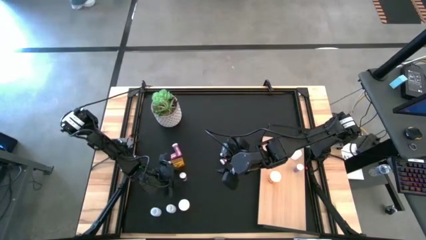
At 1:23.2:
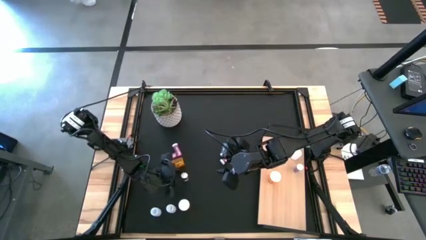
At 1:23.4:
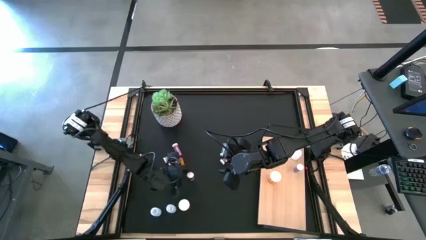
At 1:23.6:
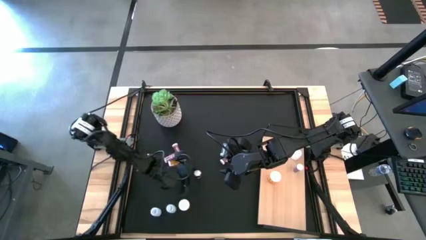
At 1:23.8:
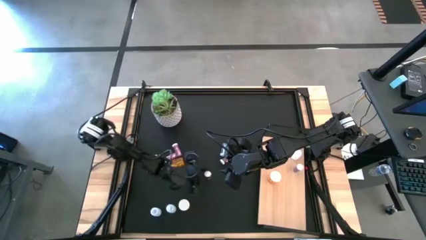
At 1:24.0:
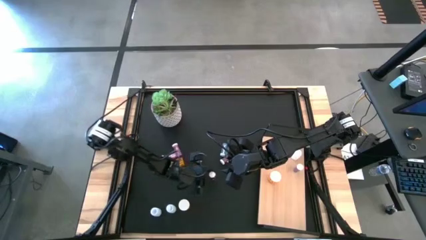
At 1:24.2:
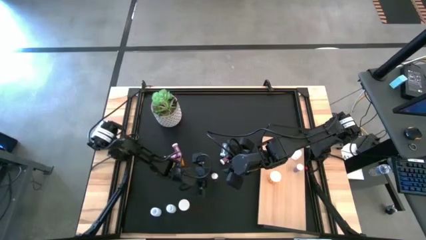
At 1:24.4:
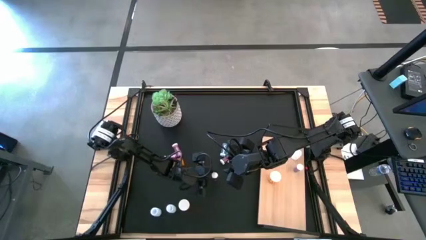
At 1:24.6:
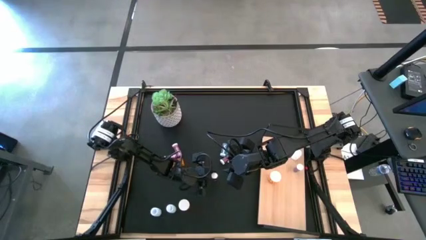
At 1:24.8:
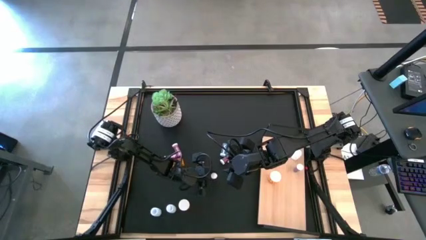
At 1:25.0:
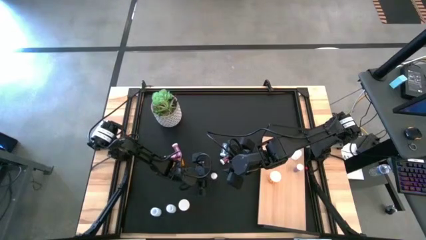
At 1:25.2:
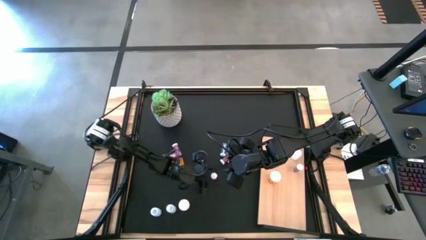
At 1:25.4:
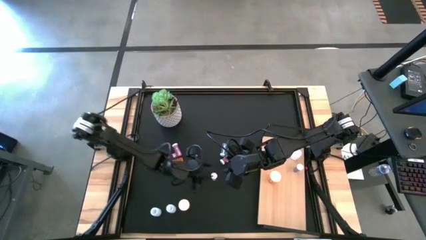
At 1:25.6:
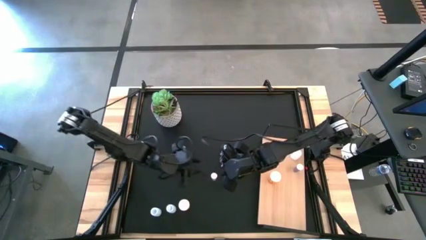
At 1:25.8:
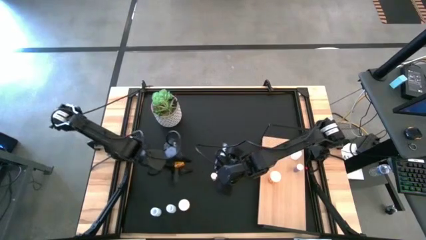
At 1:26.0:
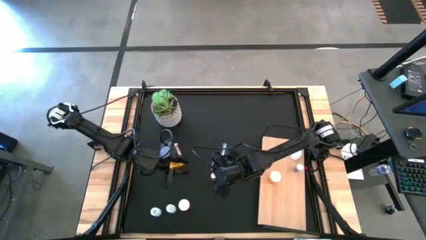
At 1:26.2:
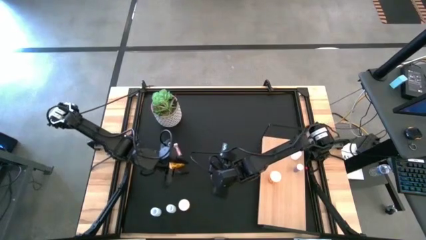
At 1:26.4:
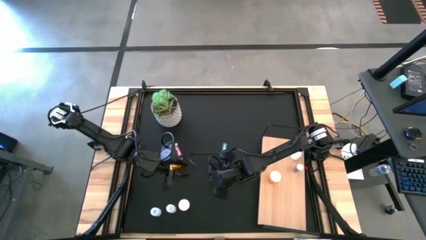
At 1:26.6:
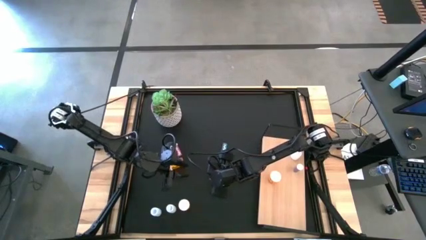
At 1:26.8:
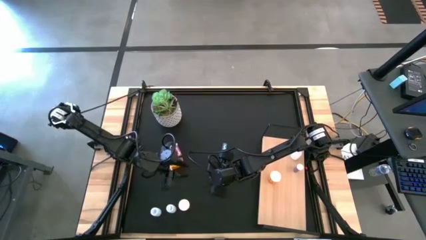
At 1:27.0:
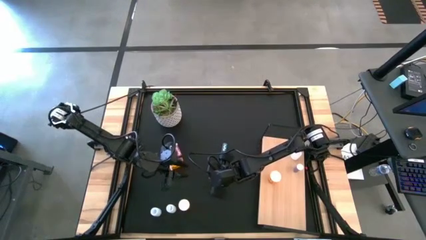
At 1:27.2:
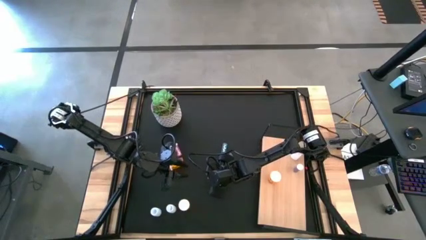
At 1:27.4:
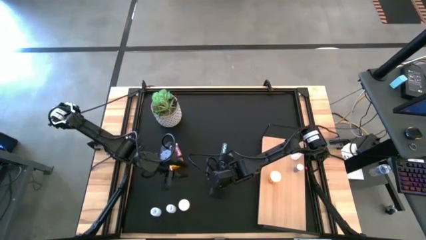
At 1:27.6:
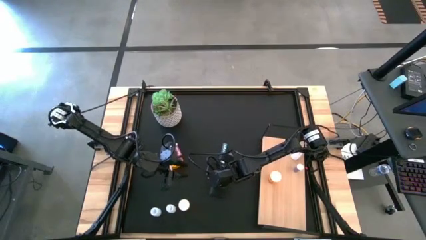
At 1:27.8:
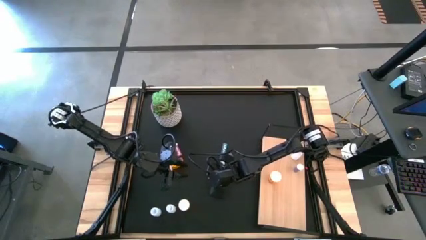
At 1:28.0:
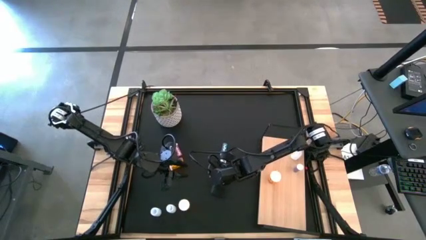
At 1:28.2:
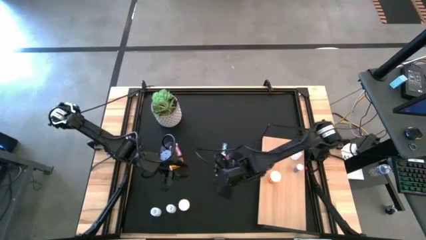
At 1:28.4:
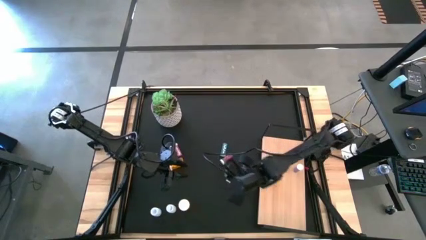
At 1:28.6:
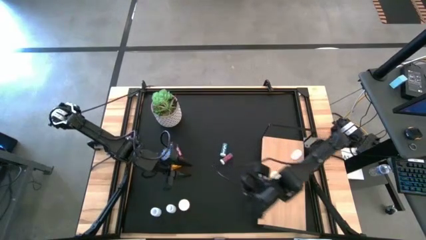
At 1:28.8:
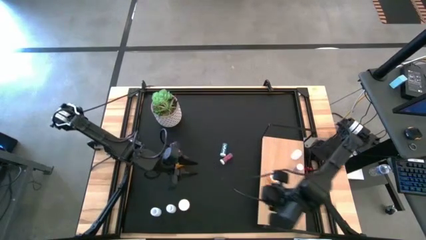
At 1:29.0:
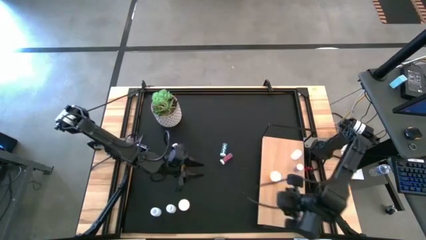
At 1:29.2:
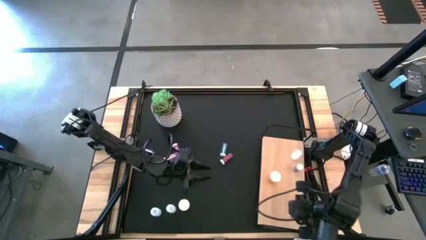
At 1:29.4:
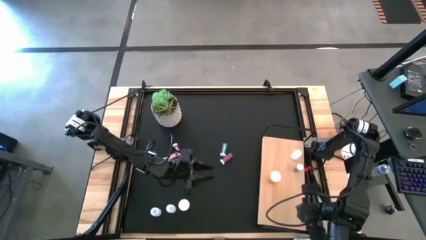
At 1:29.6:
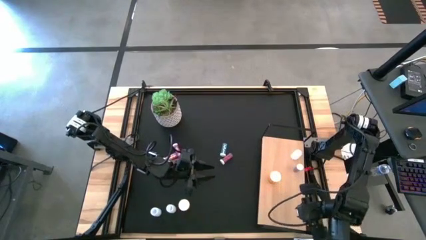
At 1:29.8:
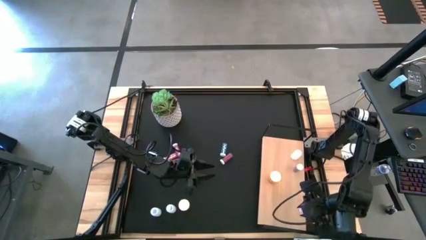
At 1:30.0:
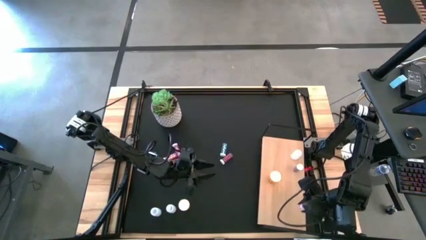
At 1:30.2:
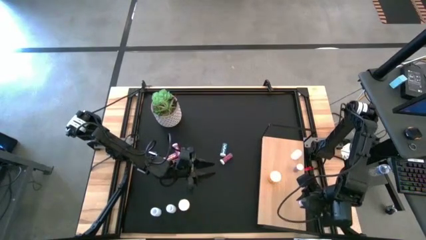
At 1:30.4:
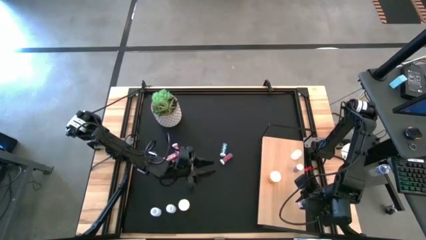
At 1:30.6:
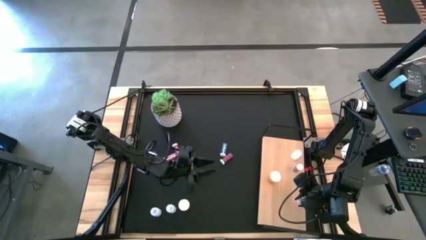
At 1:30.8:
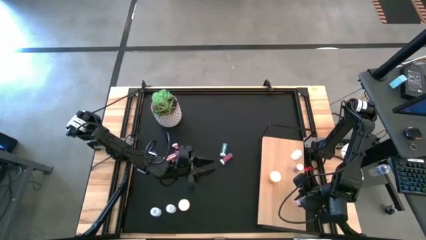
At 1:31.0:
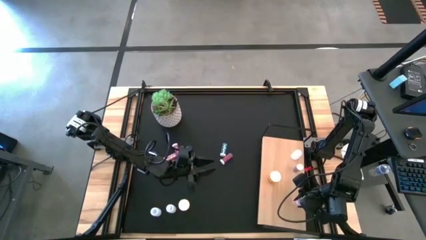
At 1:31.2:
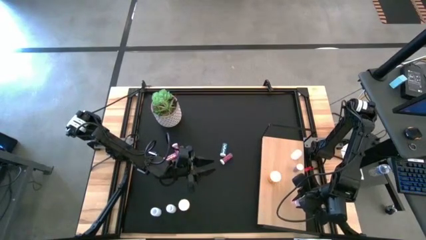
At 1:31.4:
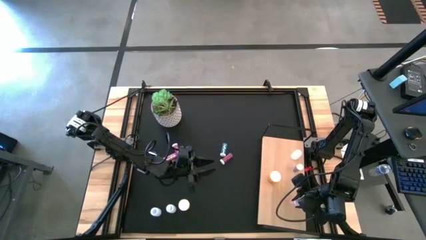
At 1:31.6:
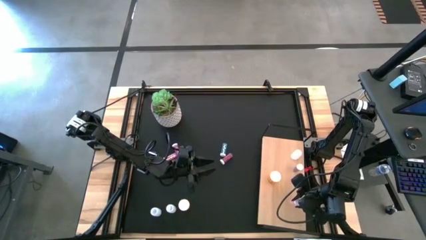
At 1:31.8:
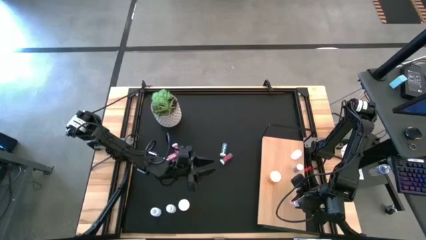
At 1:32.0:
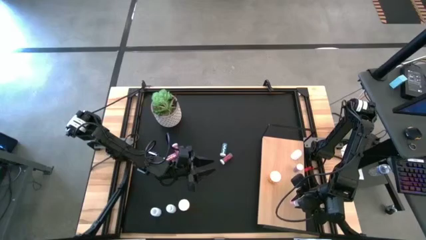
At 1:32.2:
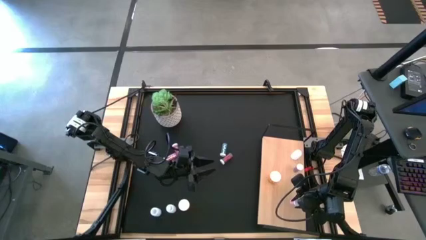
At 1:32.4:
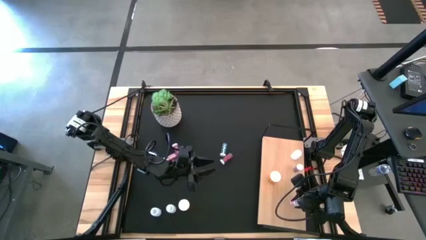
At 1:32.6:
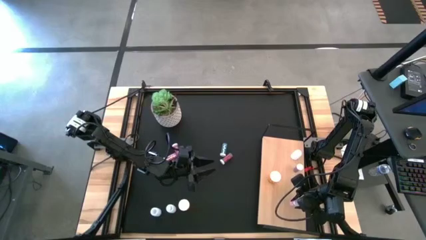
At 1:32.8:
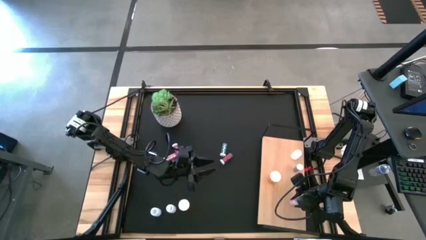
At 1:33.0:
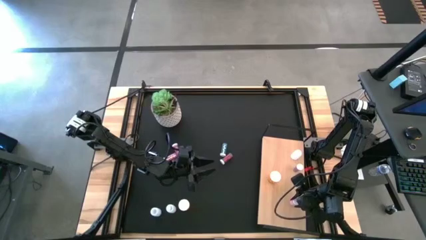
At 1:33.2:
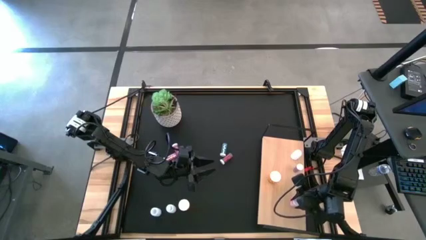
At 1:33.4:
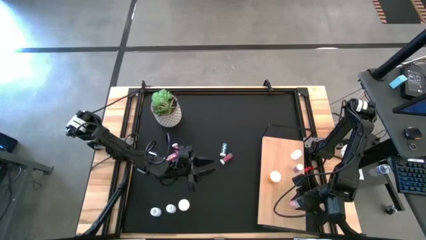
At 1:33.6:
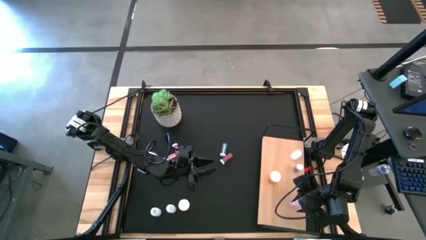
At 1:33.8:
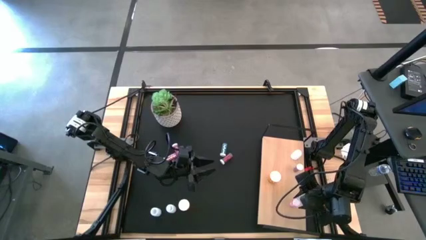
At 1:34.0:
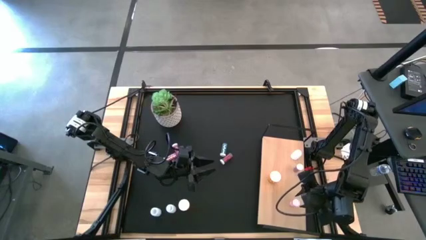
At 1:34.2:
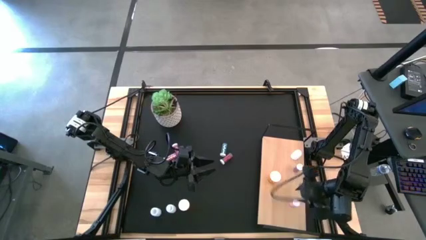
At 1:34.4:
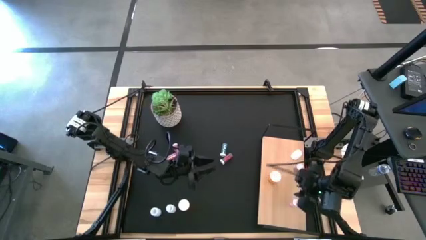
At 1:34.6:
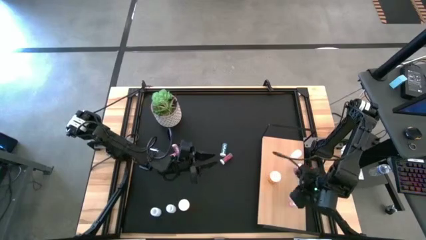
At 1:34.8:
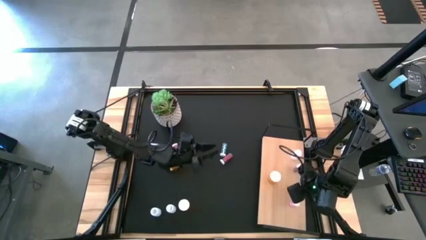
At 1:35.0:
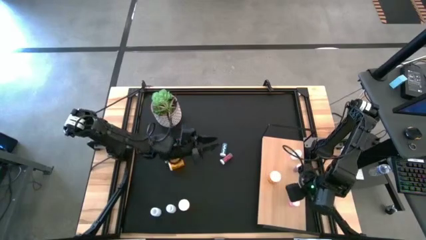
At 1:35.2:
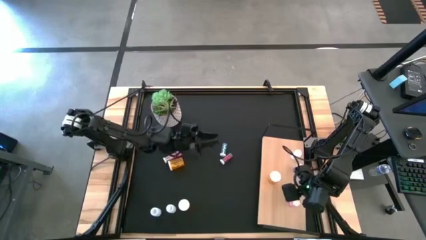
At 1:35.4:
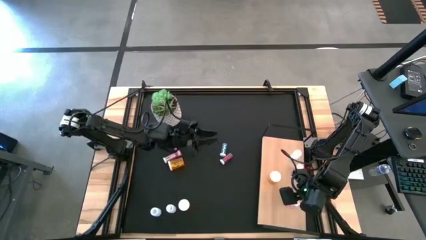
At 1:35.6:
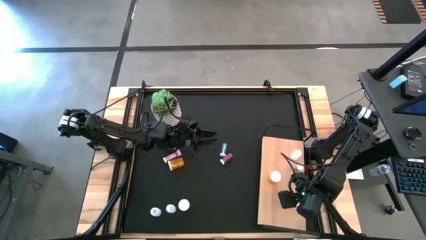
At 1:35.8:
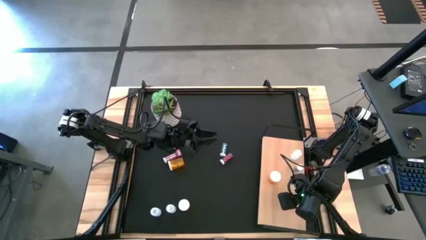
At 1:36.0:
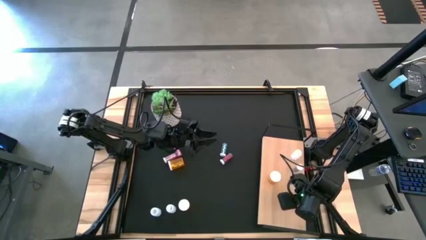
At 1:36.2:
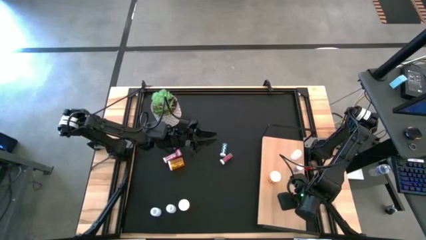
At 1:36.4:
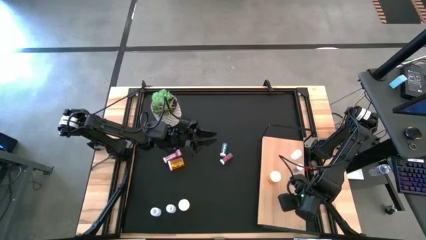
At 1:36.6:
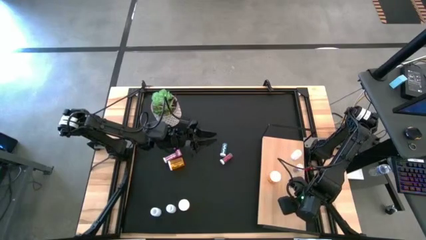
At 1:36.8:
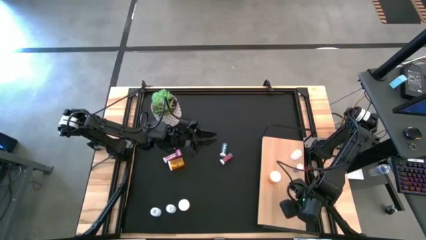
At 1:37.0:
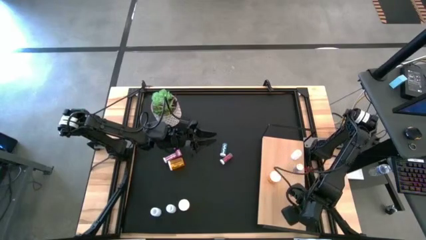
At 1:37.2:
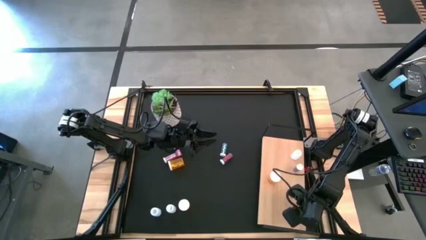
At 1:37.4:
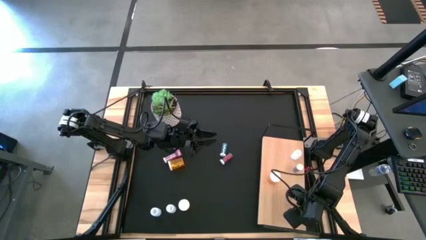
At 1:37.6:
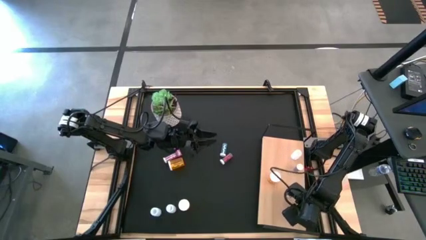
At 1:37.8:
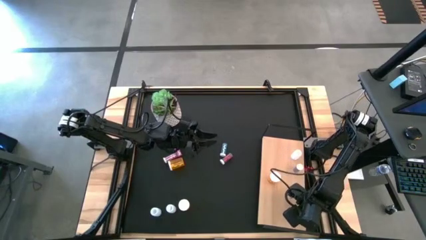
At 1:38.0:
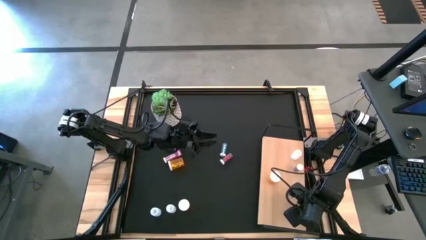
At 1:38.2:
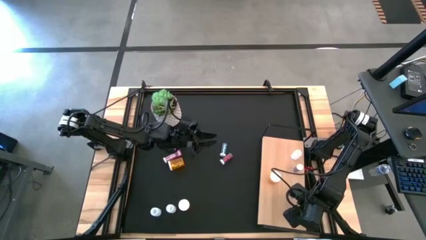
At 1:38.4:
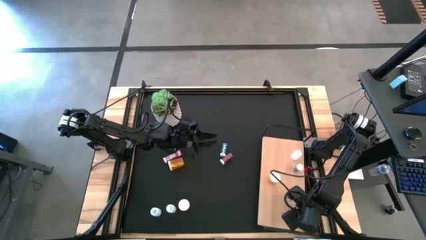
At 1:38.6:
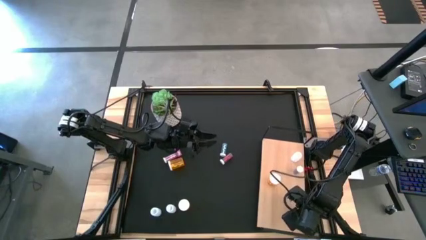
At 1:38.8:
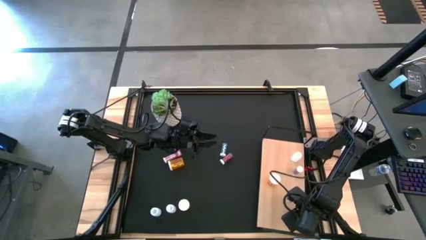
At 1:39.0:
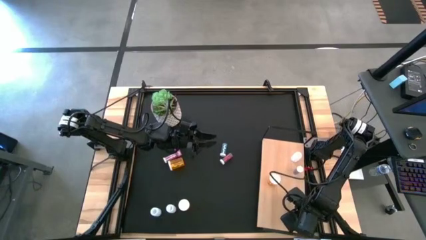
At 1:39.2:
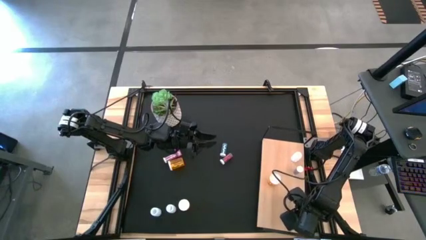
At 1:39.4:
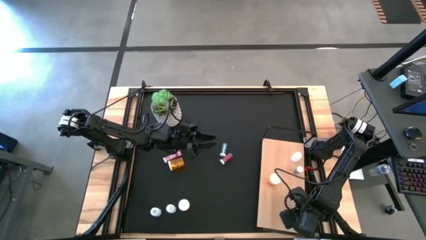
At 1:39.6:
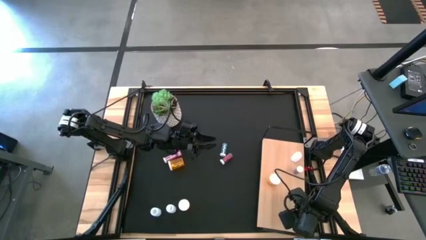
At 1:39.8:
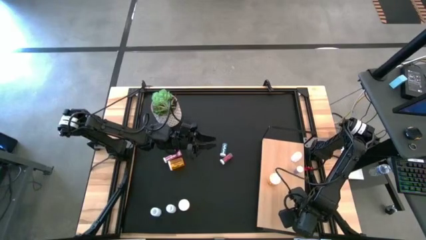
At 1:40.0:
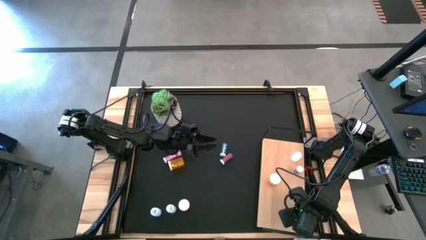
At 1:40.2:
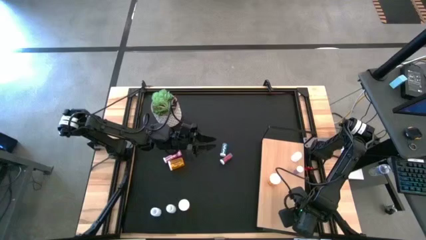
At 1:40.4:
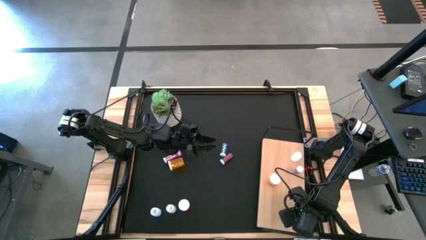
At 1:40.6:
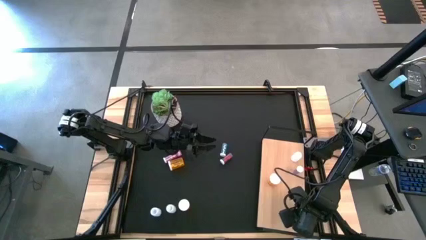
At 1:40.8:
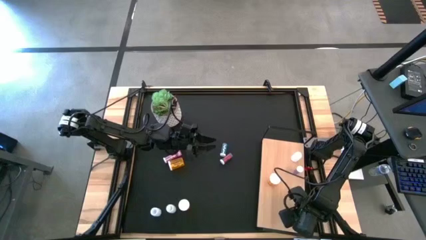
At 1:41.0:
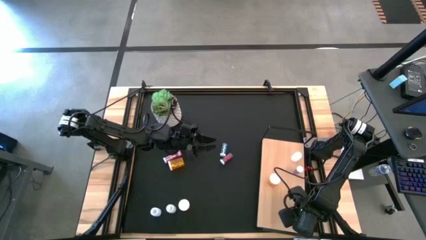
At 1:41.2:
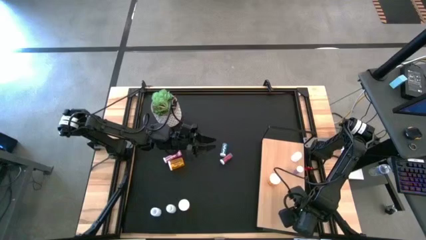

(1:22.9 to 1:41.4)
Task: Pick and place medicine bottles onto shelf by color
Put the bottom right pink table bottle on the shelf
